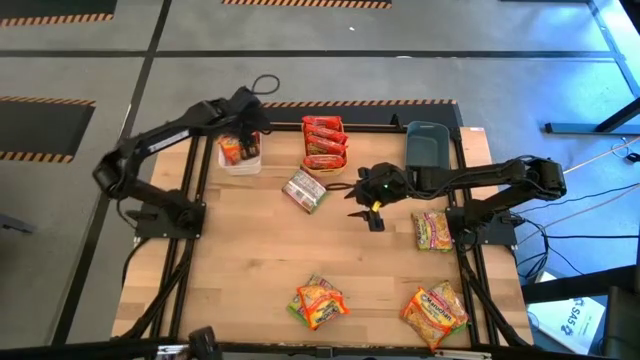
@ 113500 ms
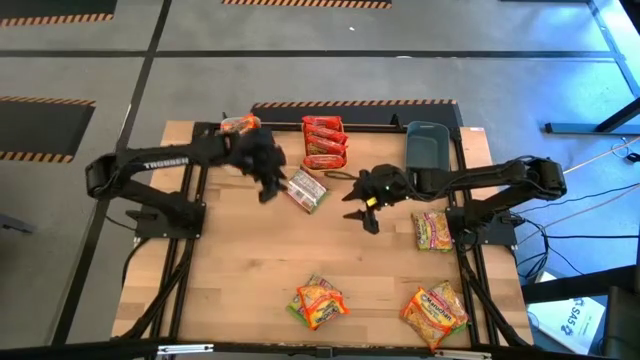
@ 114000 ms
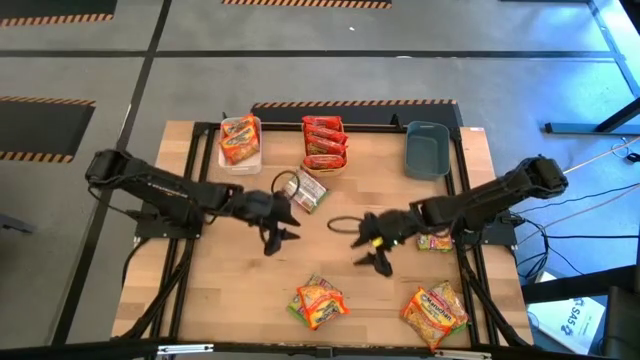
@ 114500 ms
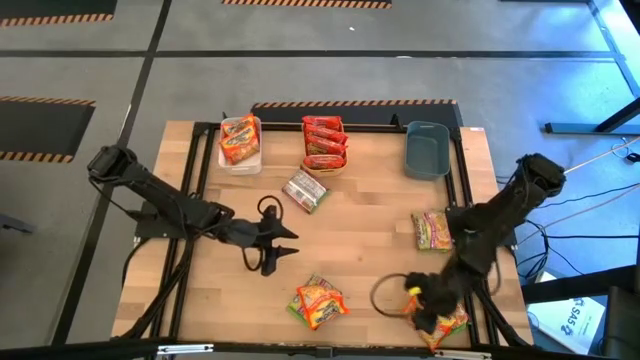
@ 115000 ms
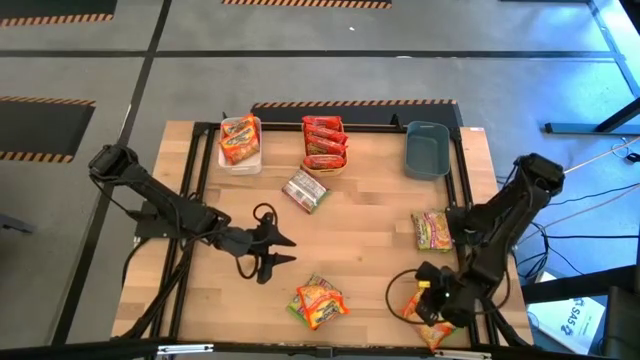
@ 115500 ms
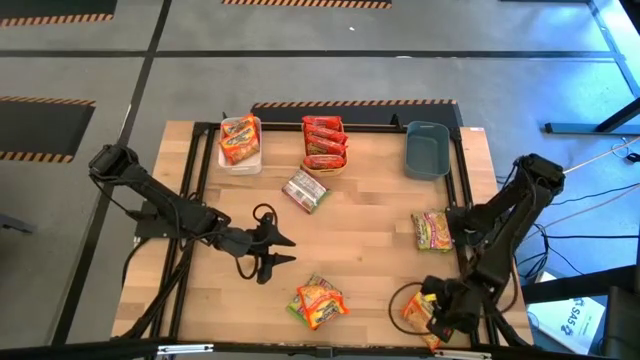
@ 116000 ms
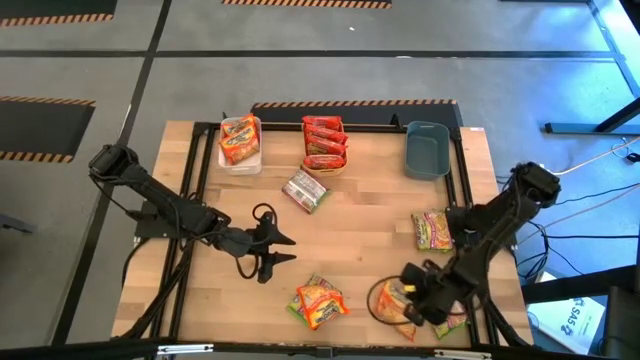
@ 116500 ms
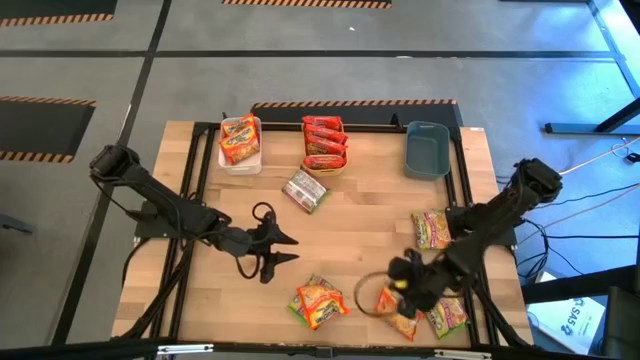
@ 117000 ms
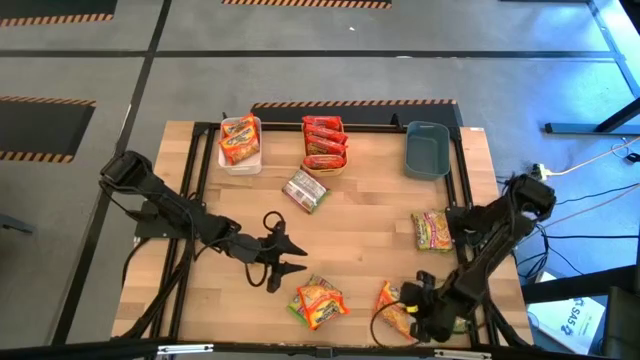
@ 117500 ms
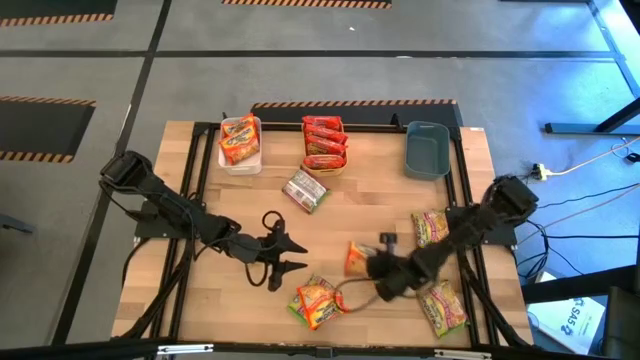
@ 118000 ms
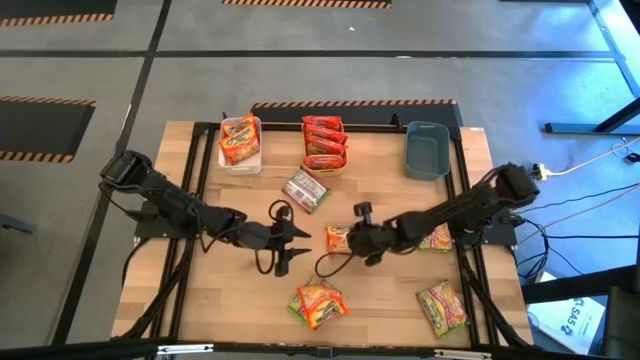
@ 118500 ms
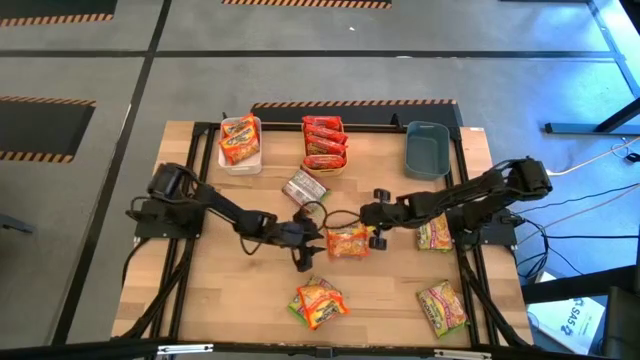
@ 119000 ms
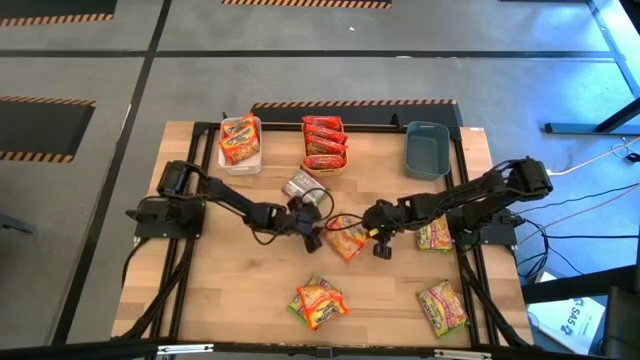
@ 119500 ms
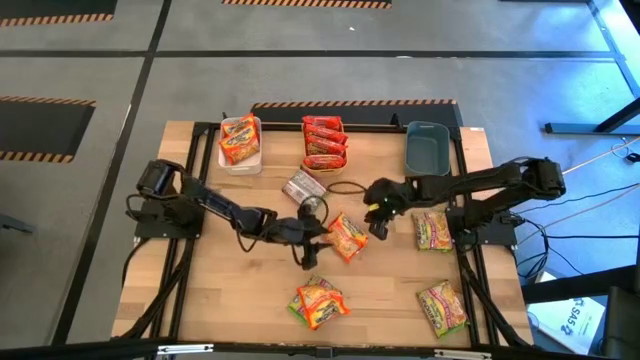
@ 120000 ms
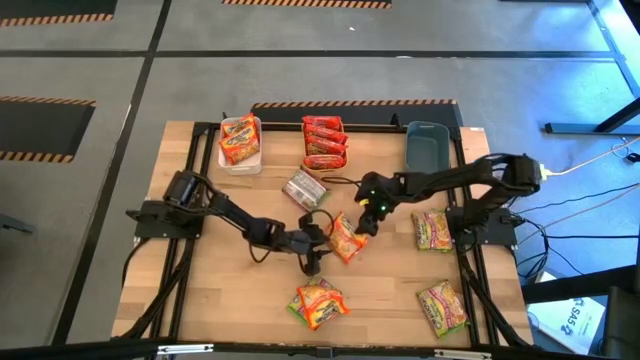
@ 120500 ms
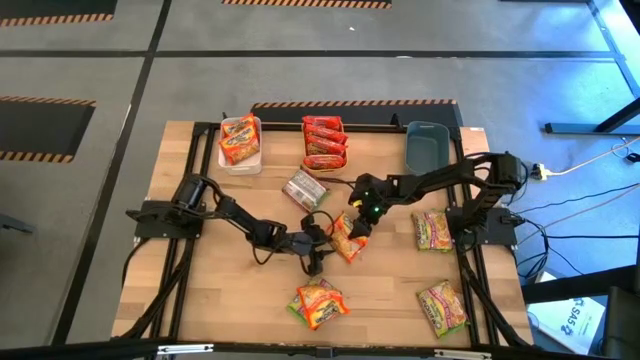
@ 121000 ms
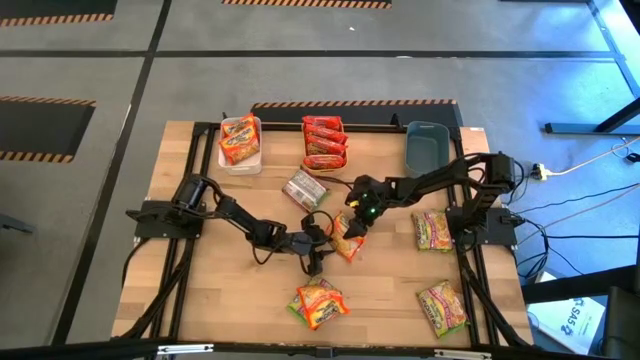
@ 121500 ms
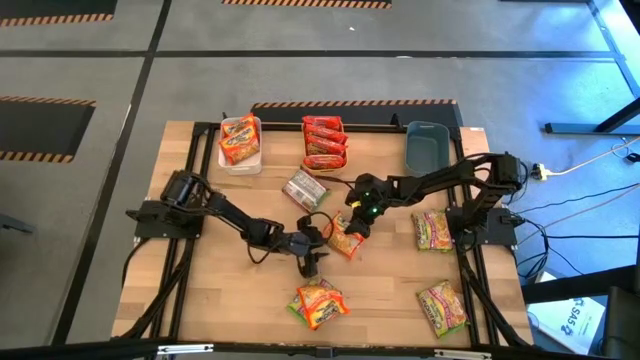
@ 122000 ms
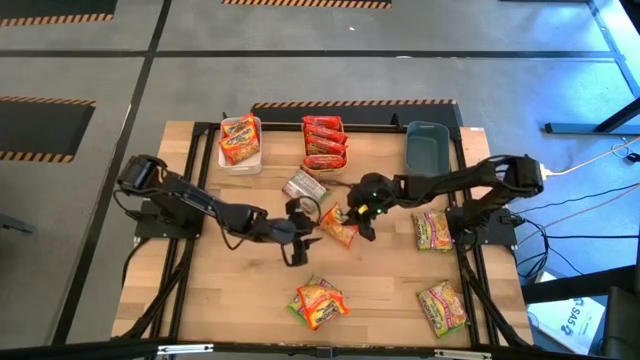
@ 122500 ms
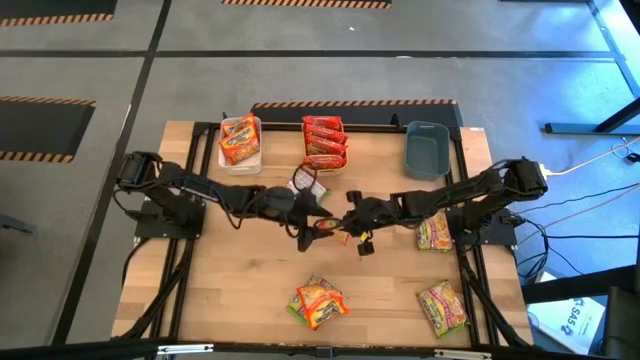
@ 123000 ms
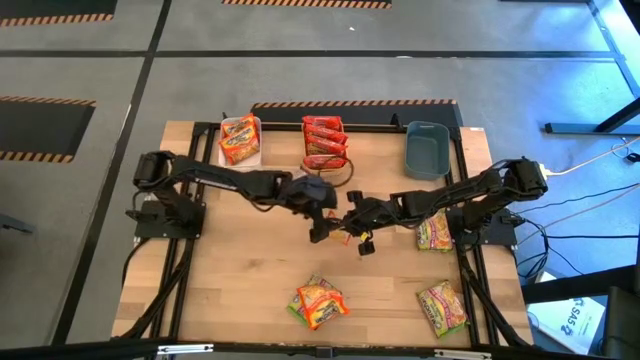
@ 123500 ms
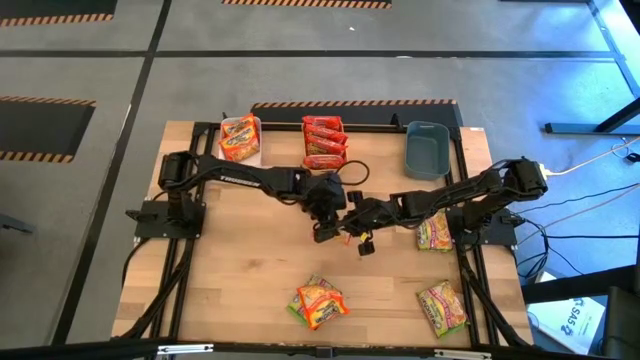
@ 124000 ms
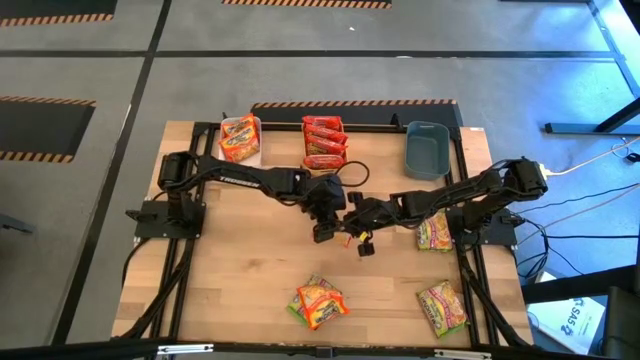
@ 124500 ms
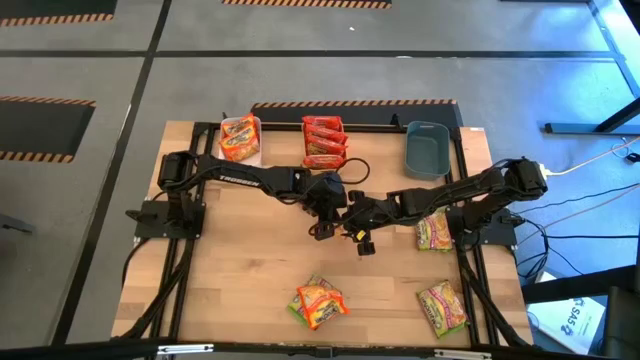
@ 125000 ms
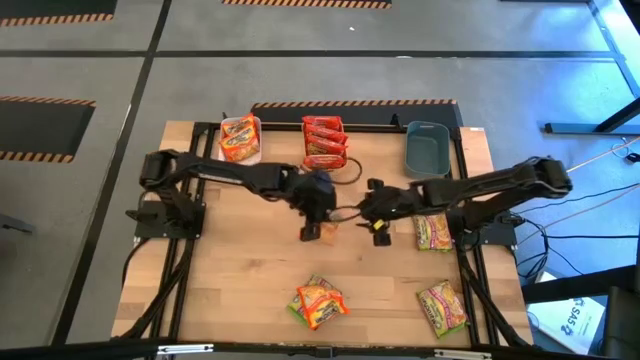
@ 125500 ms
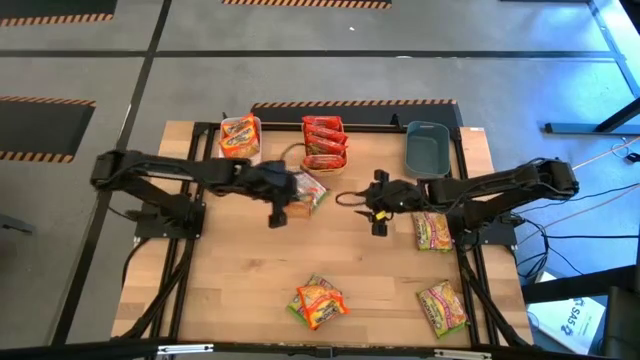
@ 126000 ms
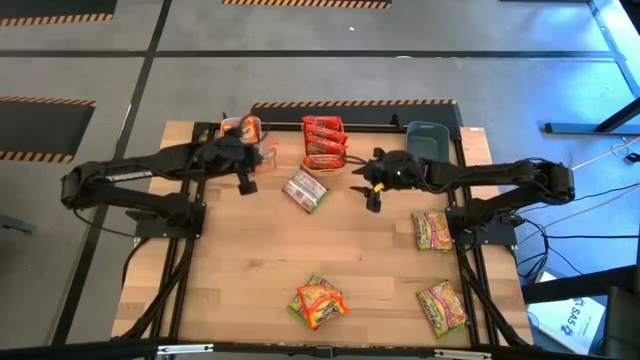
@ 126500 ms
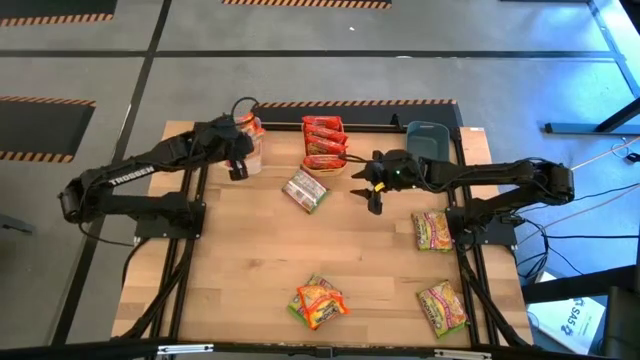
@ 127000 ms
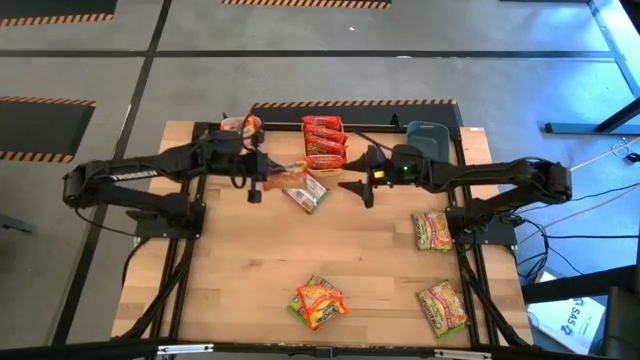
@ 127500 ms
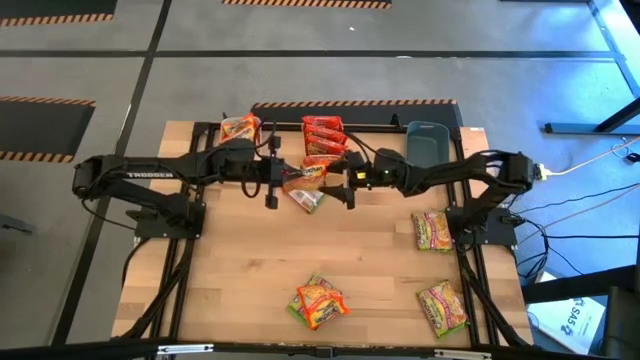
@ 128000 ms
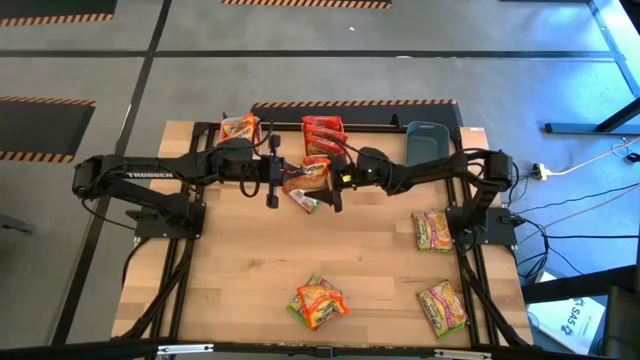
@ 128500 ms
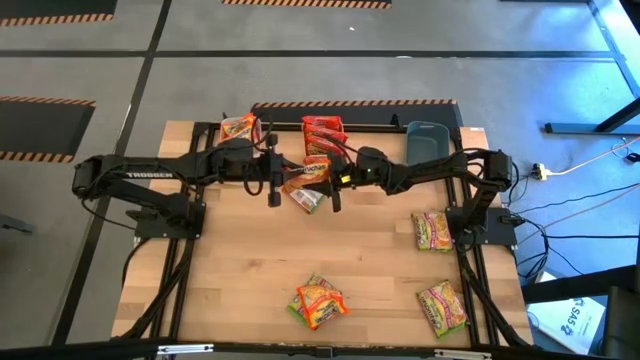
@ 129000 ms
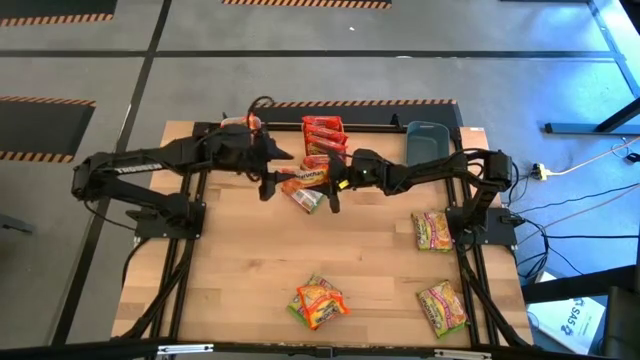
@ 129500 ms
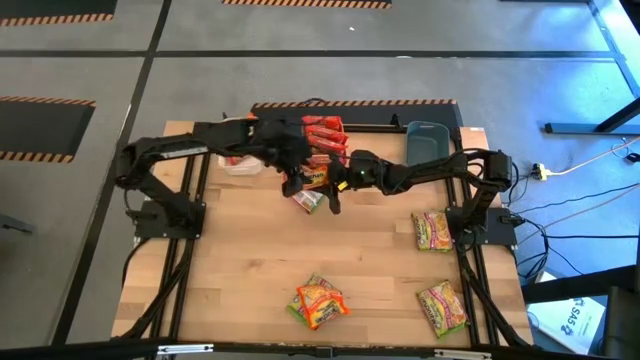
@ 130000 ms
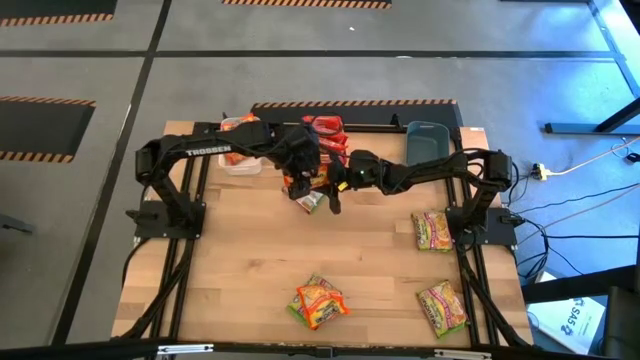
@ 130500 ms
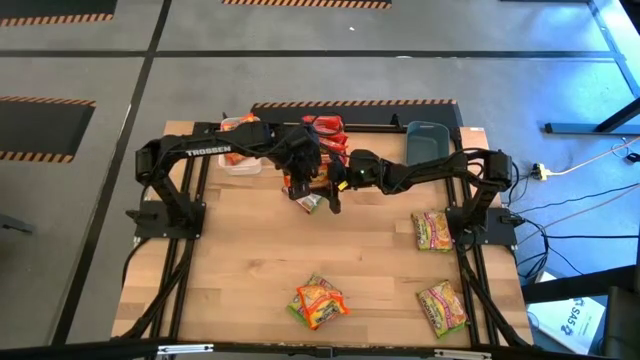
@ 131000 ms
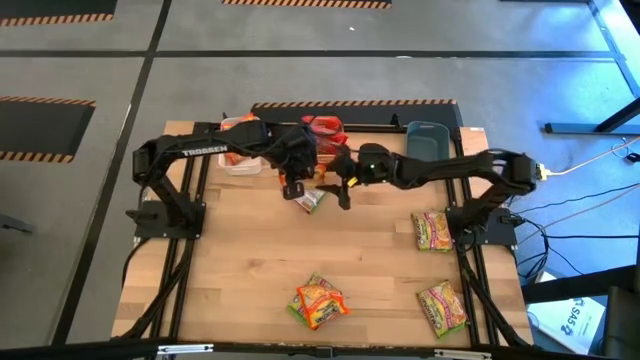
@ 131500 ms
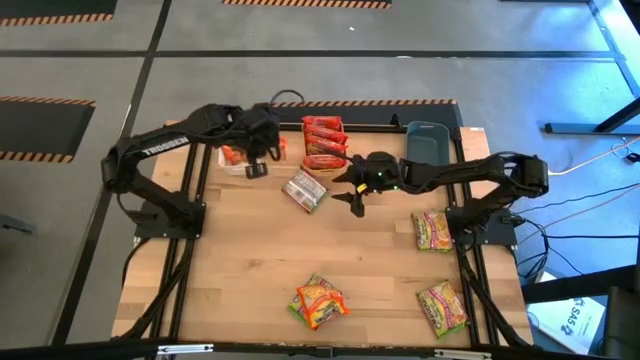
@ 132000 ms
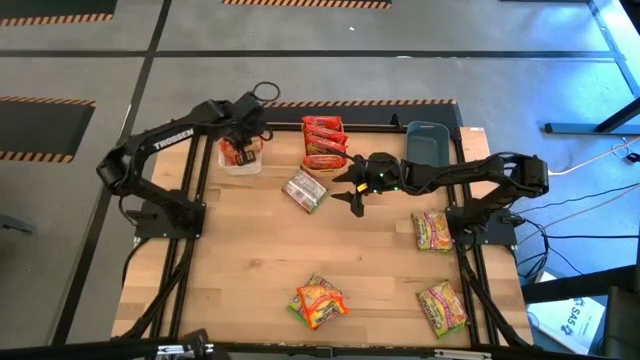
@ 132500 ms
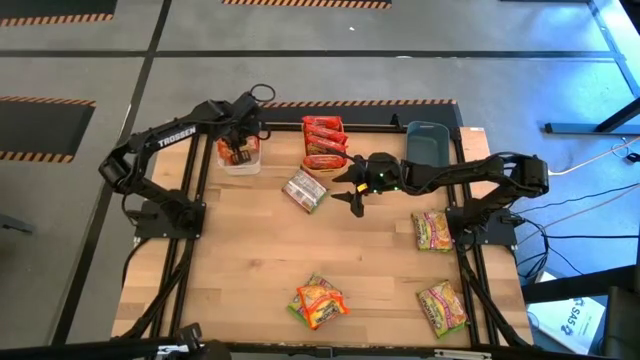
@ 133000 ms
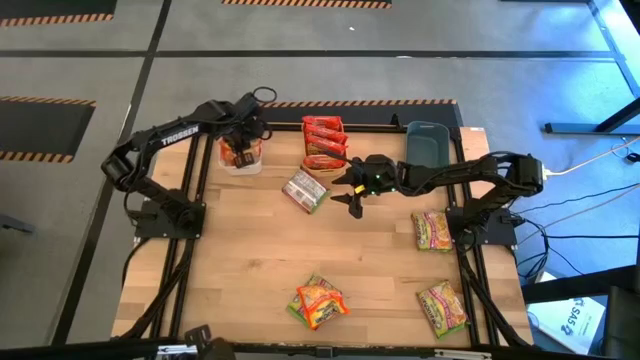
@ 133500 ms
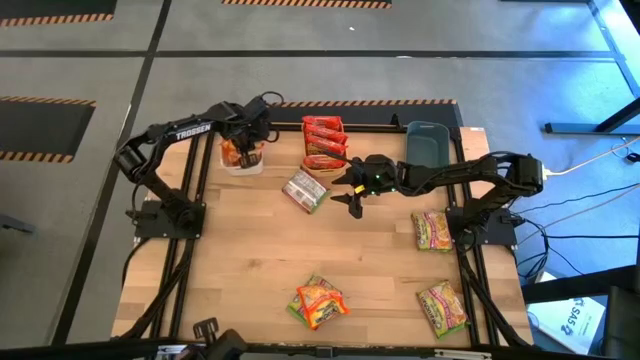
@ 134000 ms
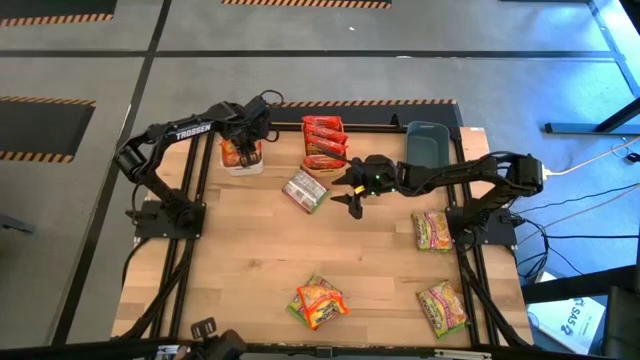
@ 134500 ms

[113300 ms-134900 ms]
Task: Sort Maruchan noodles
Put the light orange noodle pack into the white bin

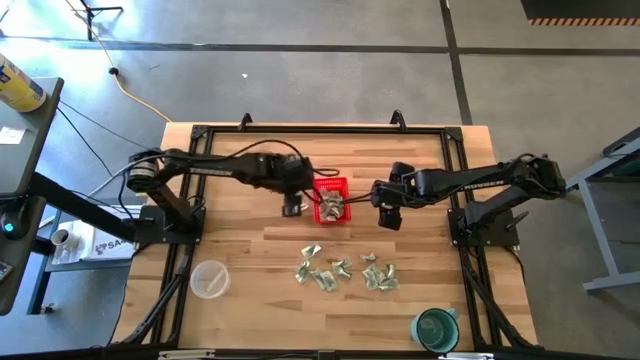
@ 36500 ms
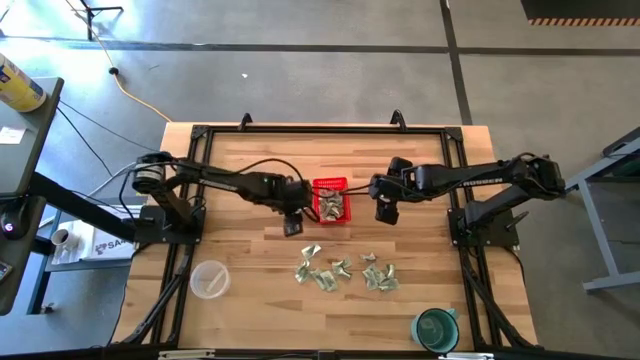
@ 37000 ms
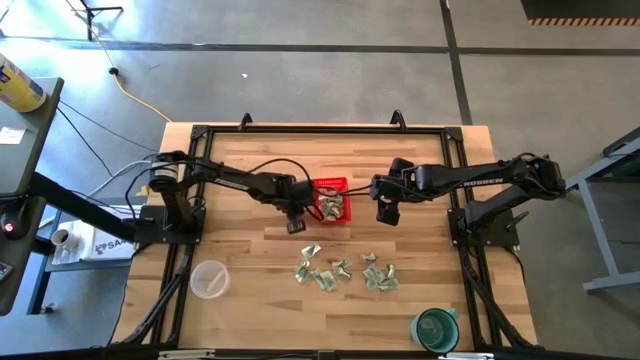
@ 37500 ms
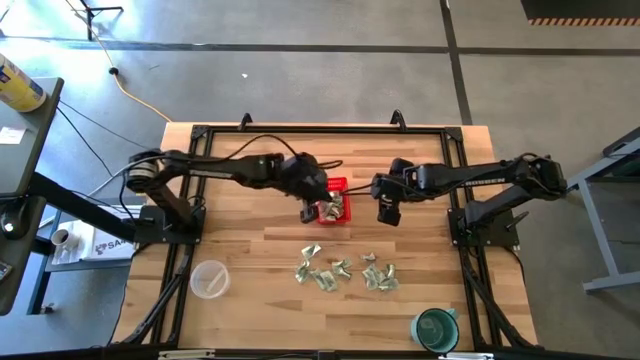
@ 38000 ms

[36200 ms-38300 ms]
Task: Pick and place items into bin
Put the light green stevia packet into the red bin
